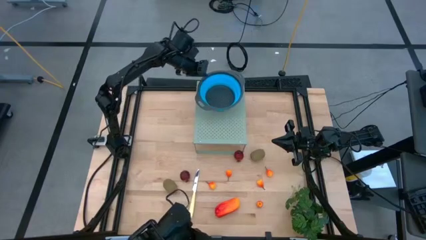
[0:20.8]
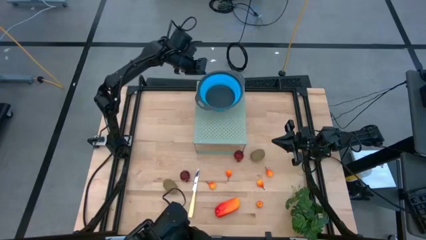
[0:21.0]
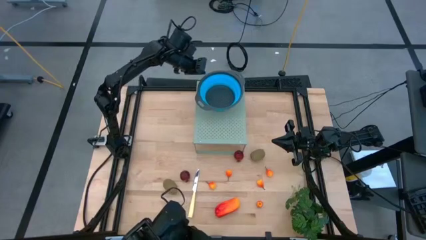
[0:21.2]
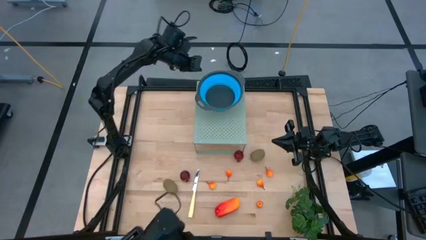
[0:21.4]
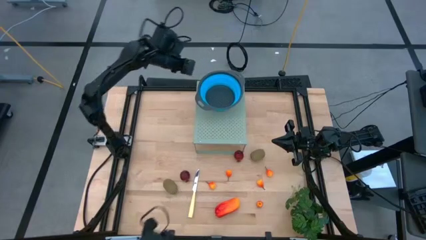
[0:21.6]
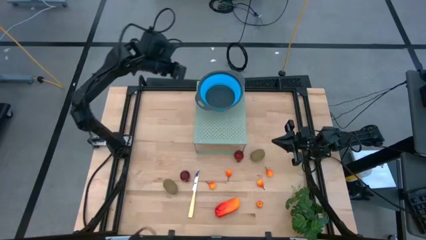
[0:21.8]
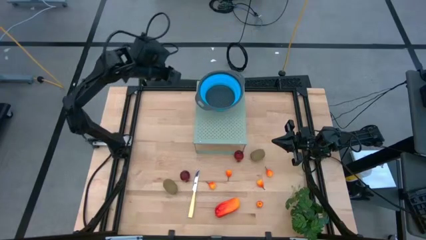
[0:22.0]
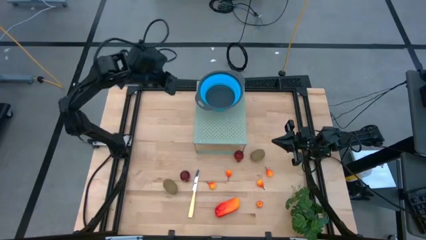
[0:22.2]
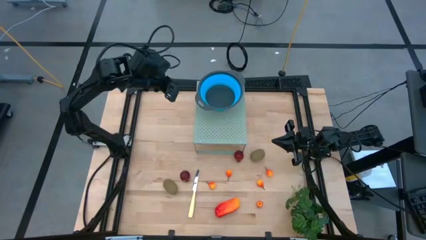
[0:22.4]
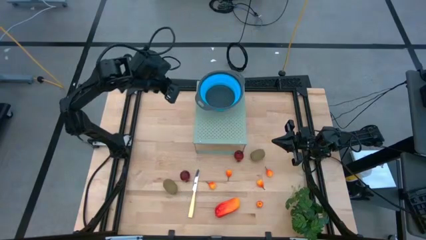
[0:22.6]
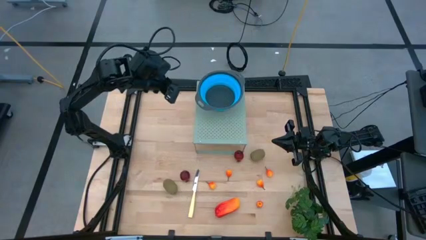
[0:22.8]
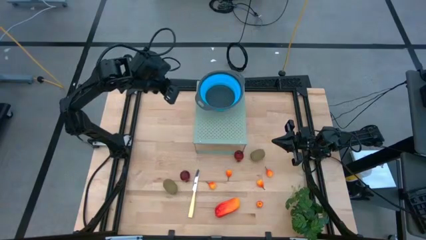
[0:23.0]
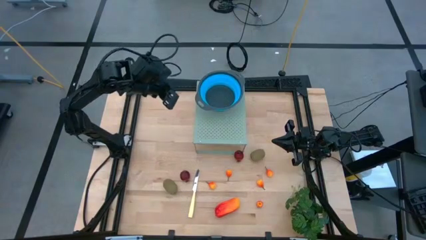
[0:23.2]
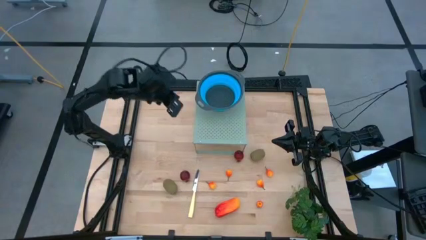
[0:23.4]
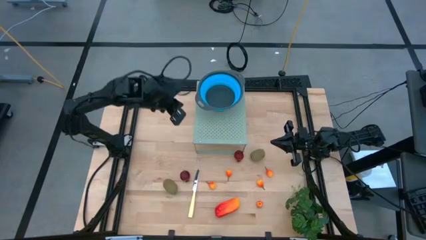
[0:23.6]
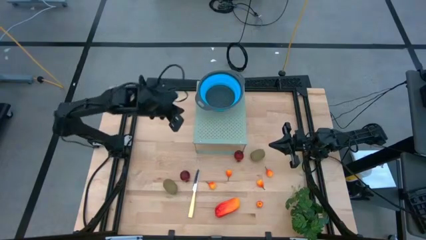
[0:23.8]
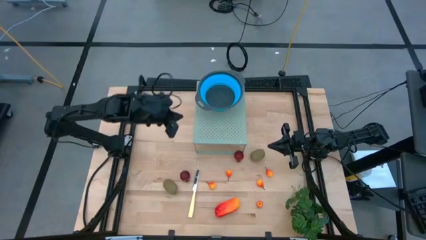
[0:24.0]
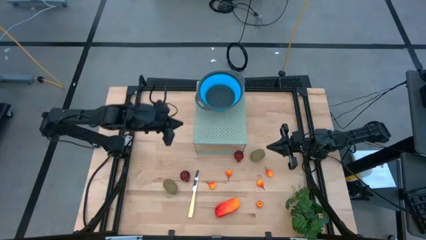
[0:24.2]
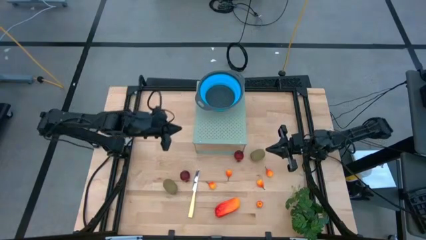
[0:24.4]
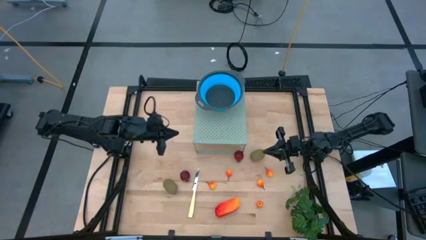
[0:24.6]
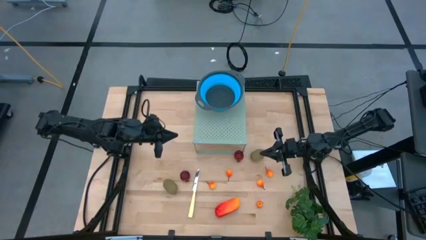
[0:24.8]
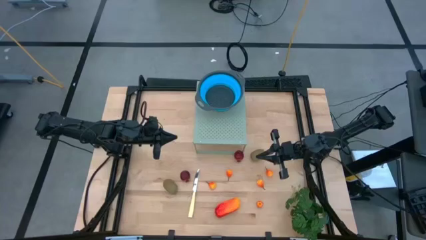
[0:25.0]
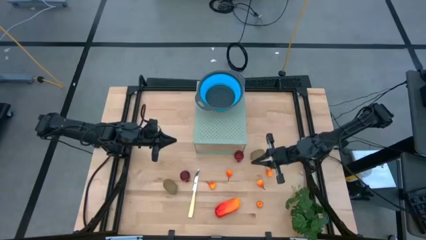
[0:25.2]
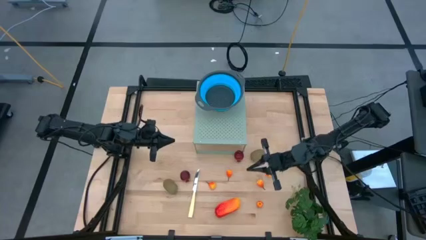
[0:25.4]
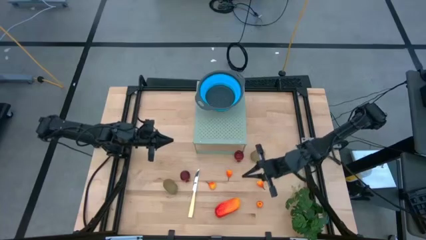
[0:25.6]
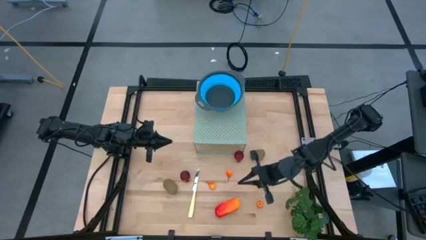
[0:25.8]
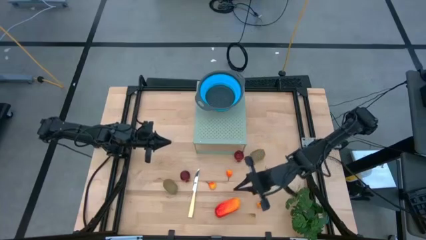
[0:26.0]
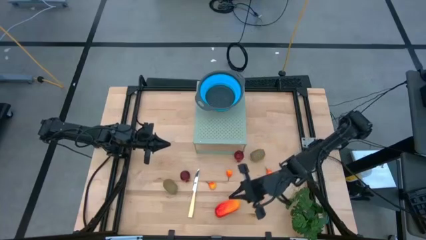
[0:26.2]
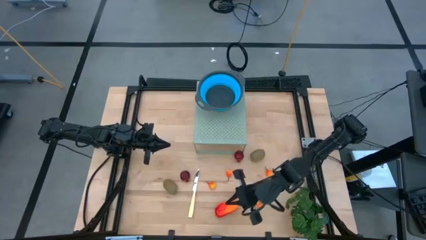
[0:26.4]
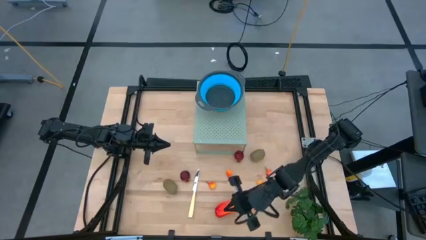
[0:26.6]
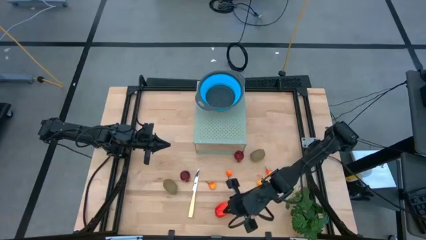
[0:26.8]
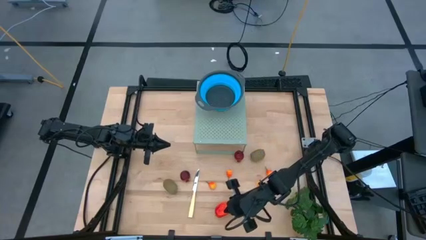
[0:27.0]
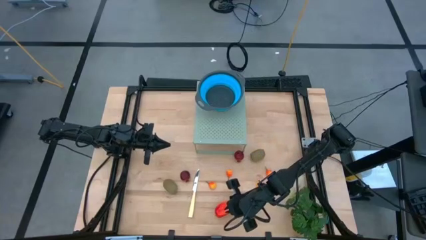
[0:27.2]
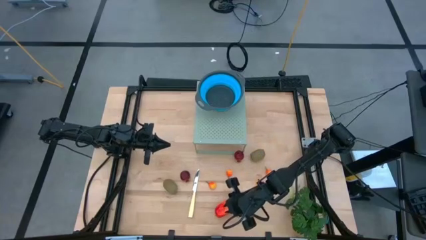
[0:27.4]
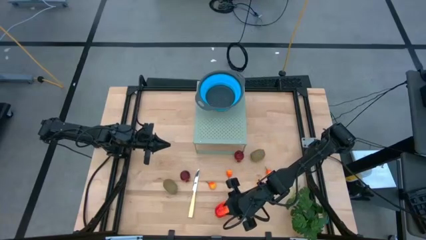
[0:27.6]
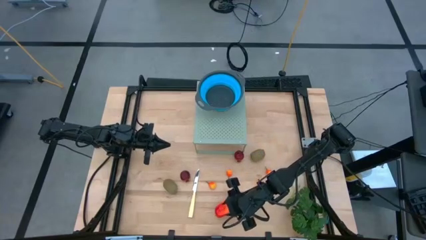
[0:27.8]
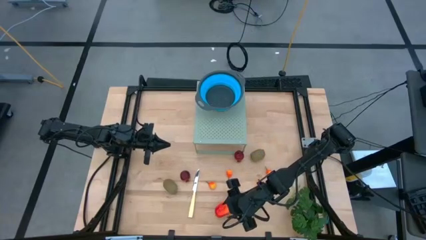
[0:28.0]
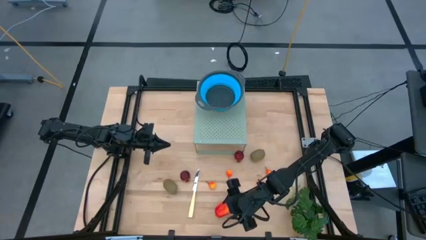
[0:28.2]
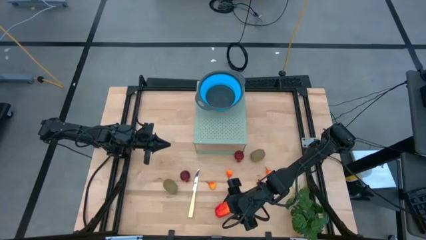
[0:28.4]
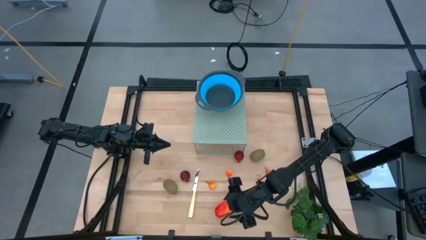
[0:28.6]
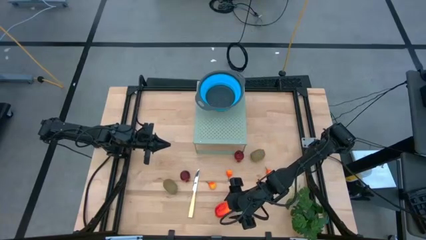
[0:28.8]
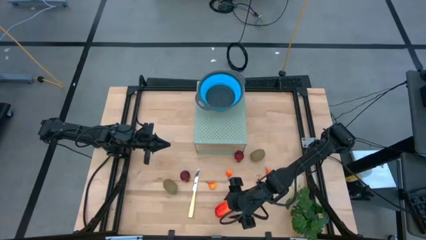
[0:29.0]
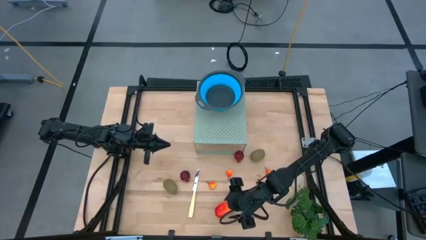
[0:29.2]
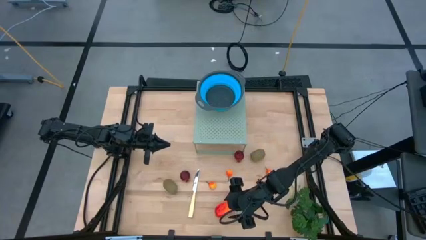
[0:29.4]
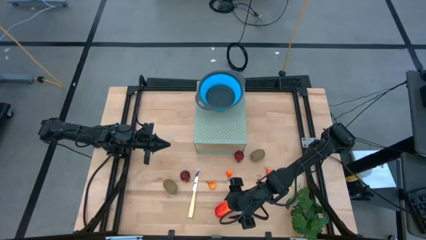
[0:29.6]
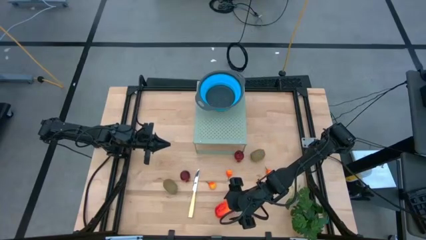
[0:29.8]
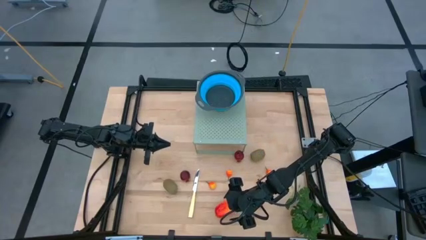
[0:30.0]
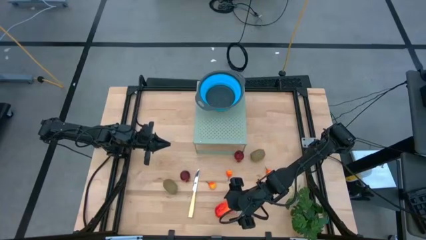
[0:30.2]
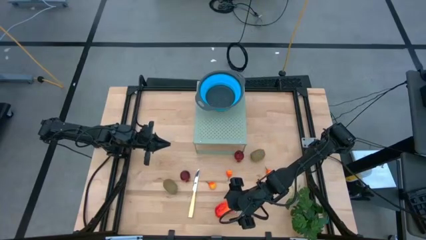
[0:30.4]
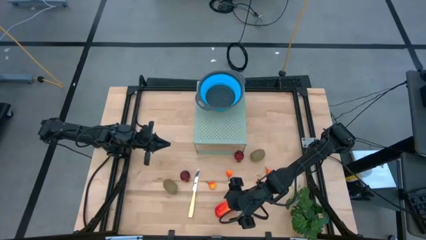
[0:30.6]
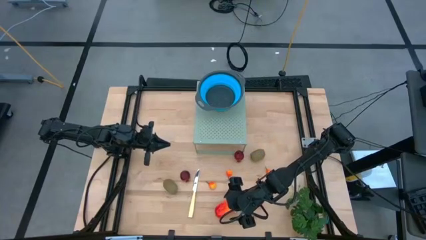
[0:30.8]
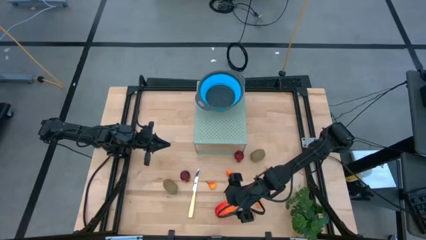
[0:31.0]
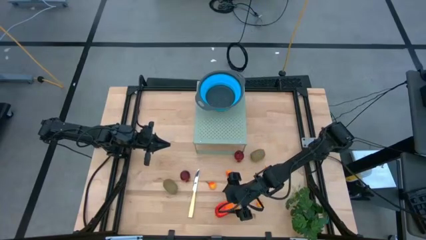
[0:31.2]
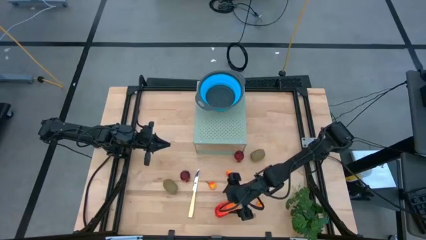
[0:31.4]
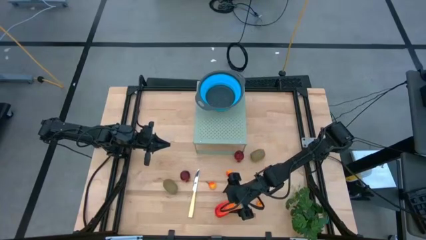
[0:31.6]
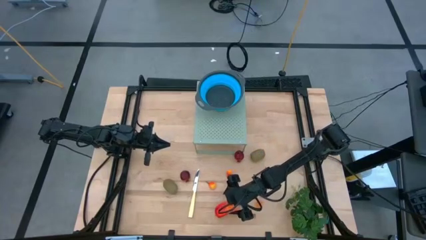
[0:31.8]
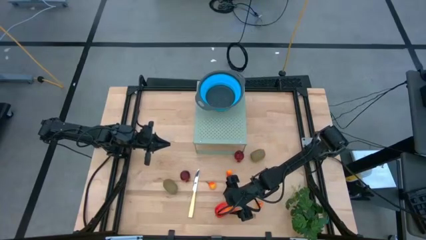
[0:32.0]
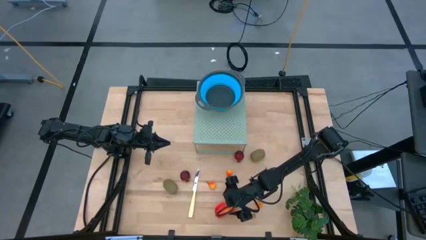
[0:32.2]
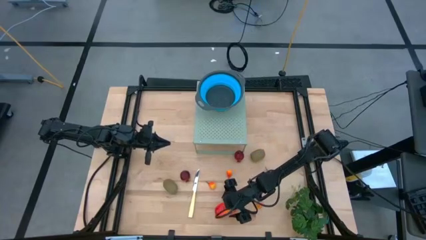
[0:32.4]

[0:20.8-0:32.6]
Task: Pick & Place Fruit
Put the mango into the blue strainer bowl on the shelf
